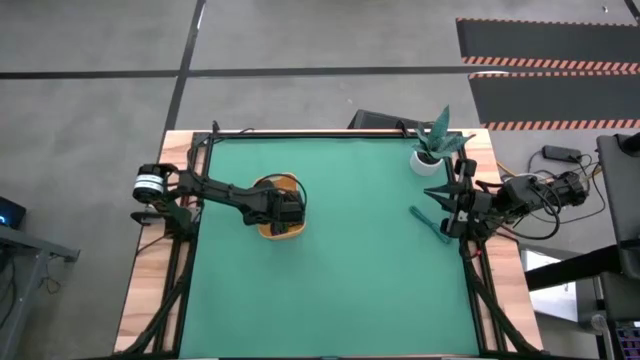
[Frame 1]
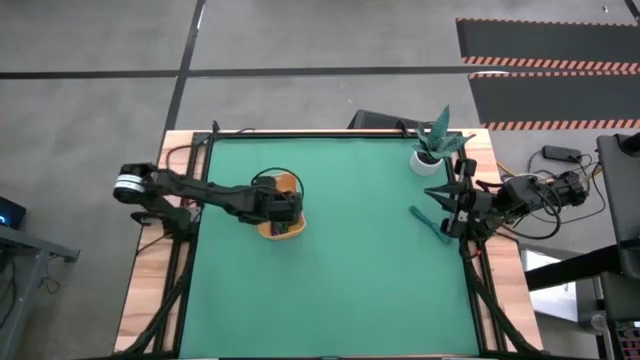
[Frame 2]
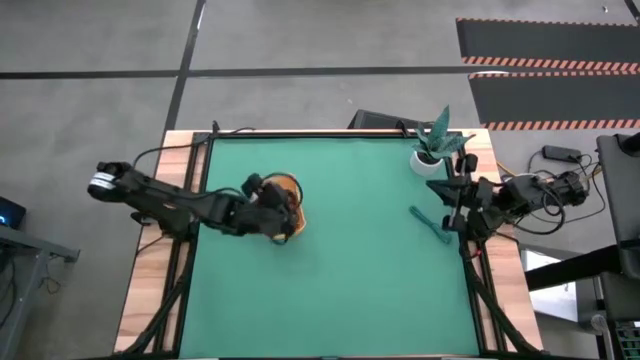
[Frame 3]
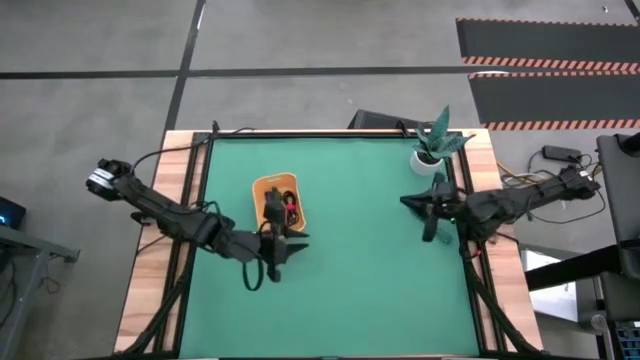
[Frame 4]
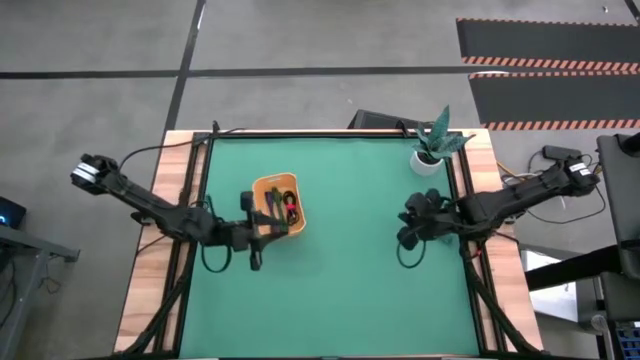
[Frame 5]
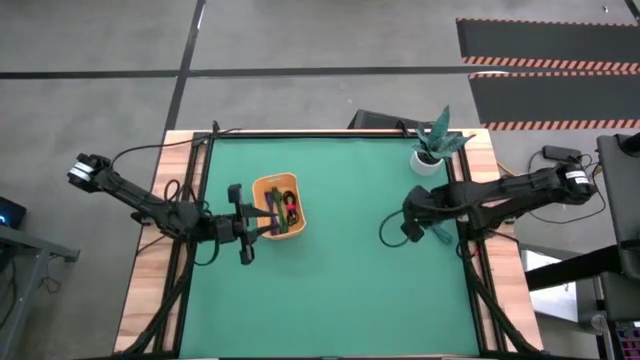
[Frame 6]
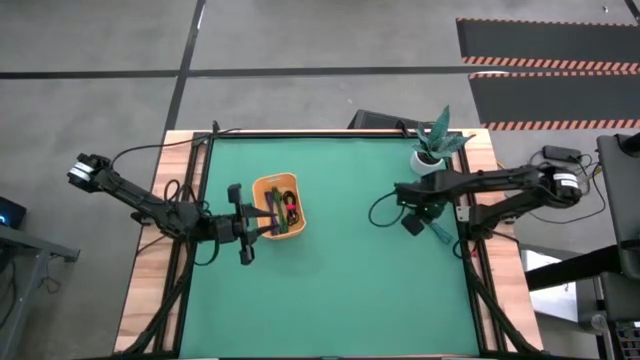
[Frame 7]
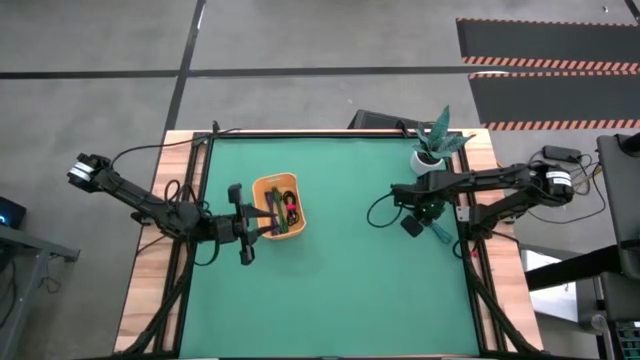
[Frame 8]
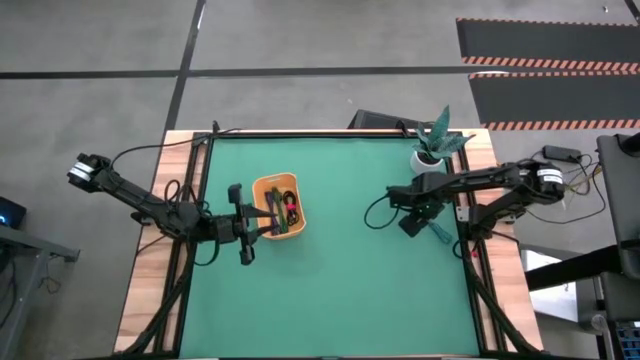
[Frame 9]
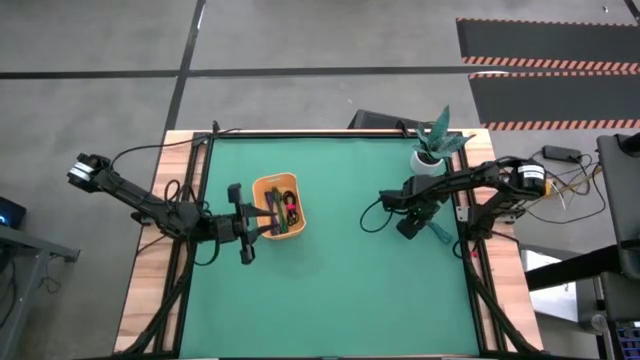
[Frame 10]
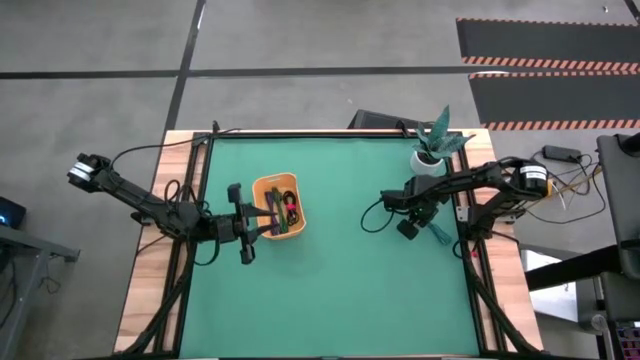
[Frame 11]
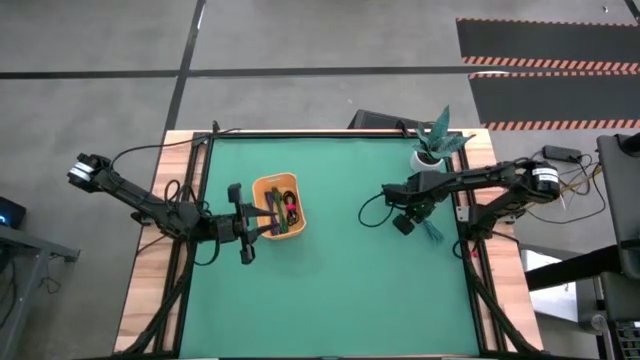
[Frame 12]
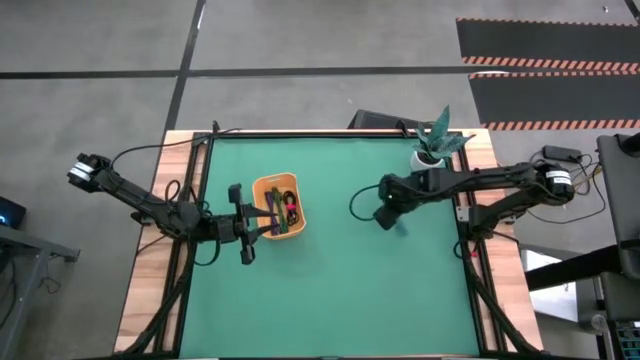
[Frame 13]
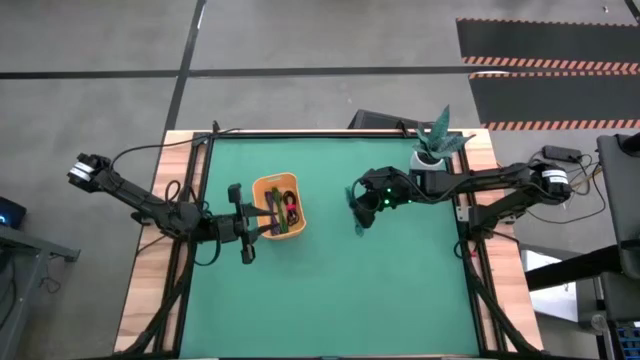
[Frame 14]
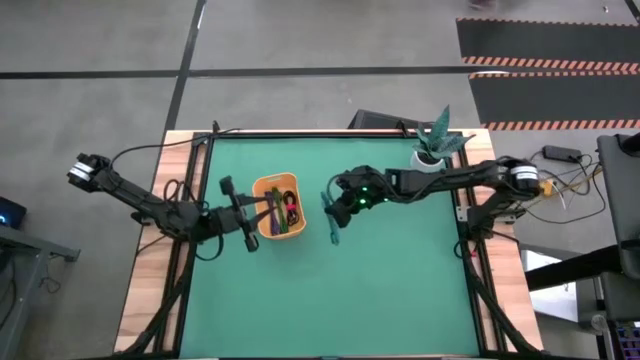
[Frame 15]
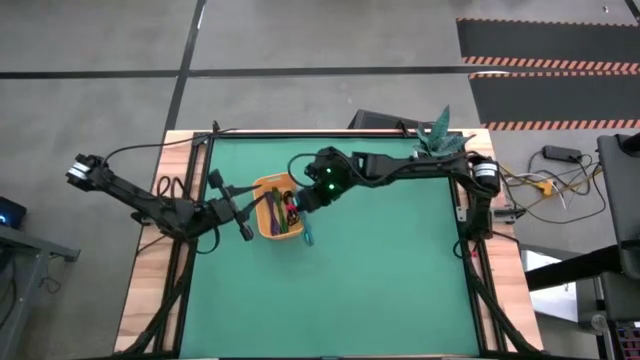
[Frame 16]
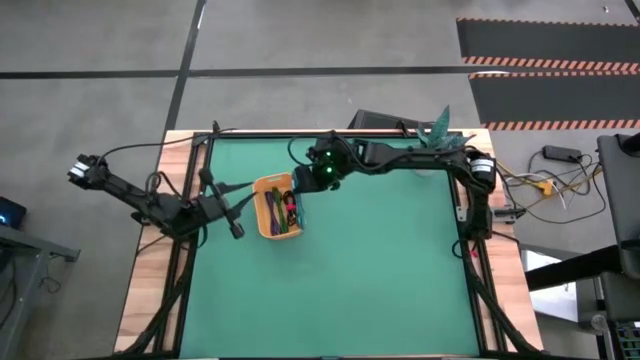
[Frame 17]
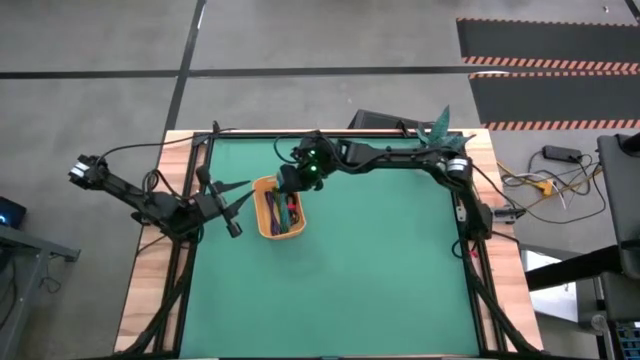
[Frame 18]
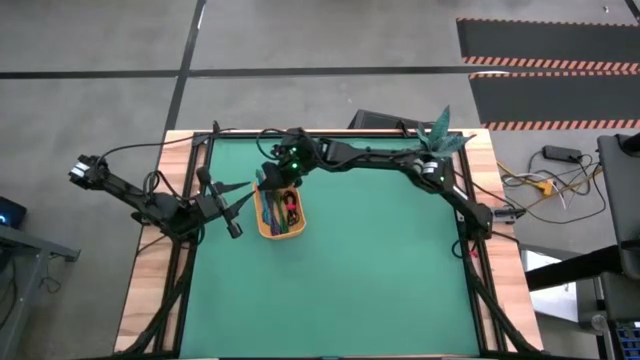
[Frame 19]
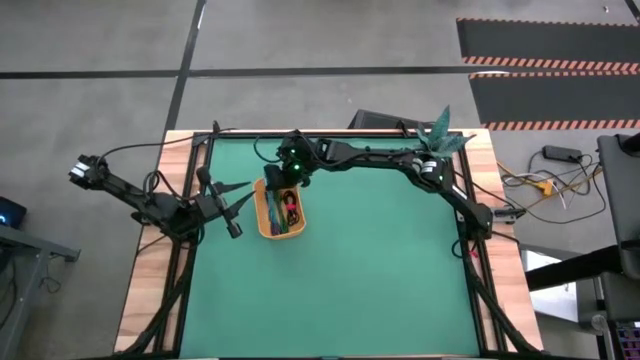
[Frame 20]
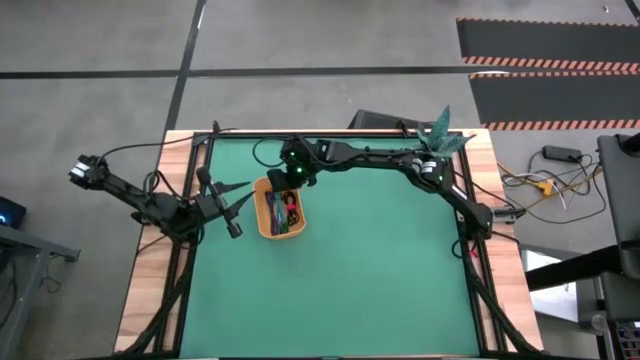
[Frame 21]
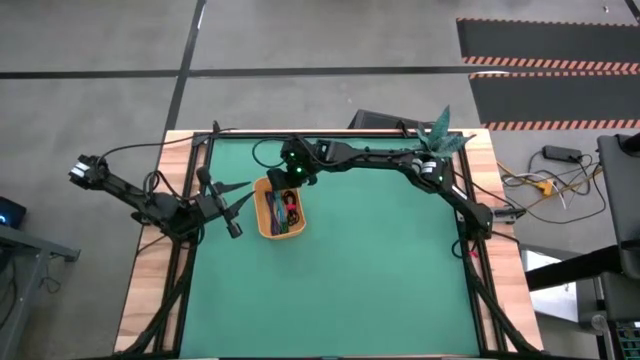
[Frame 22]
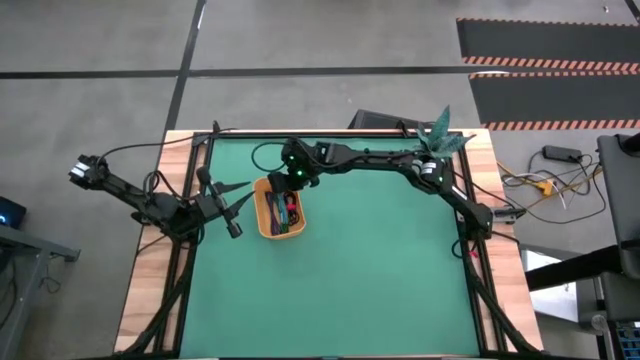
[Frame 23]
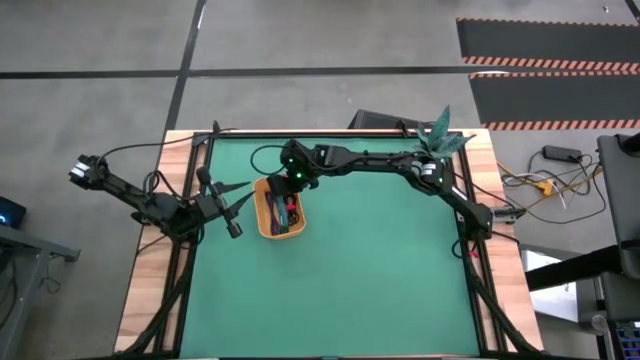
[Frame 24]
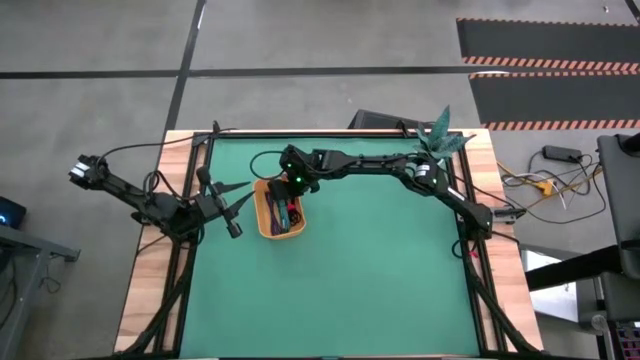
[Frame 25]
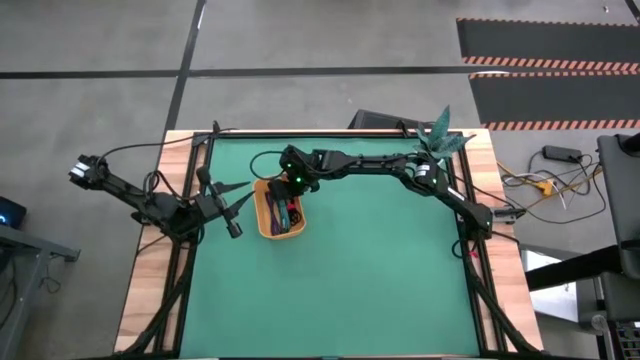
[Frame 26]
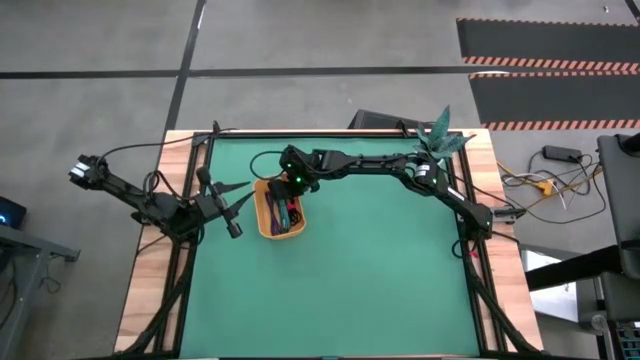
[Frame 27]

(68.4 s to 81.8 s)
Task: Pick and place USB-C Cables
Put the blue USB cable into the orange bin

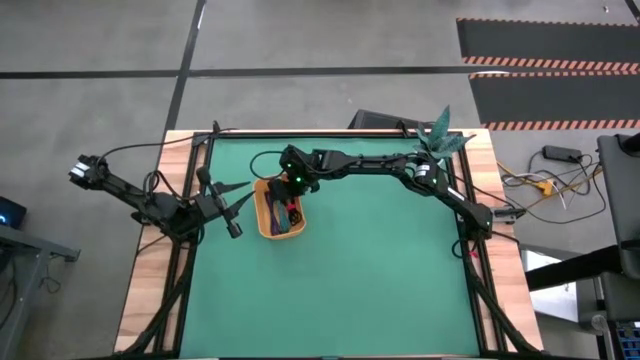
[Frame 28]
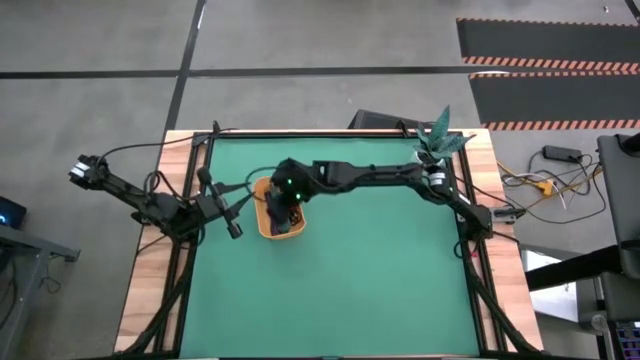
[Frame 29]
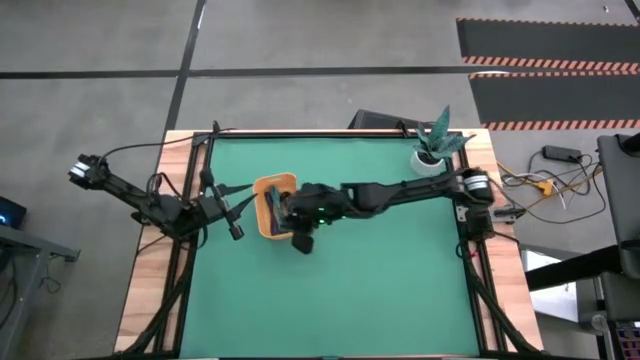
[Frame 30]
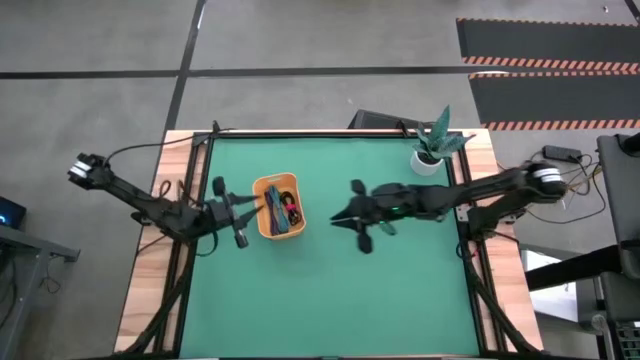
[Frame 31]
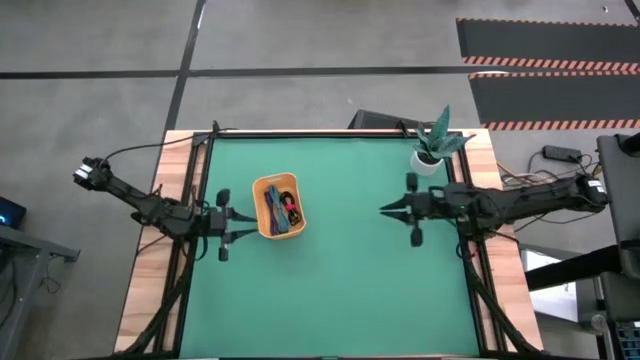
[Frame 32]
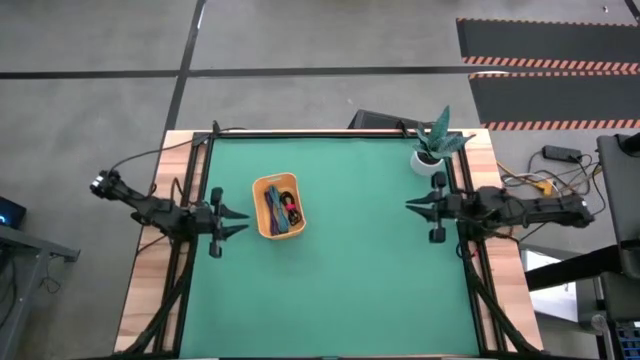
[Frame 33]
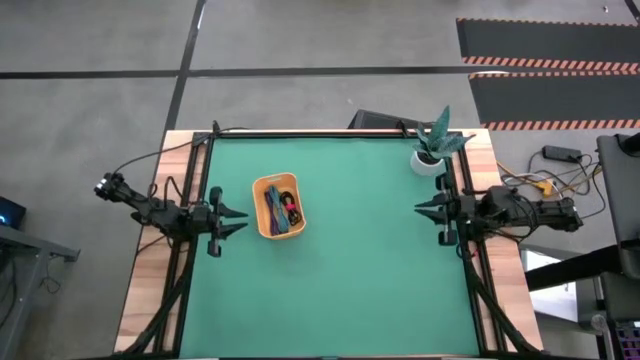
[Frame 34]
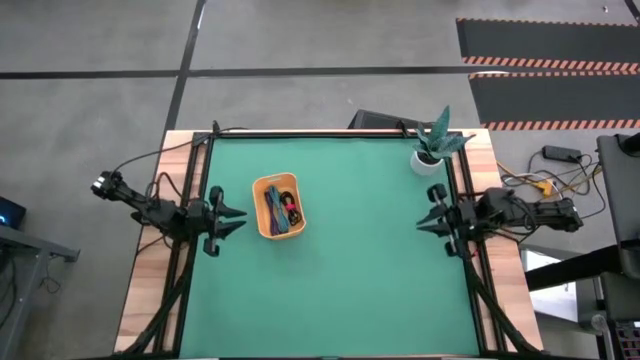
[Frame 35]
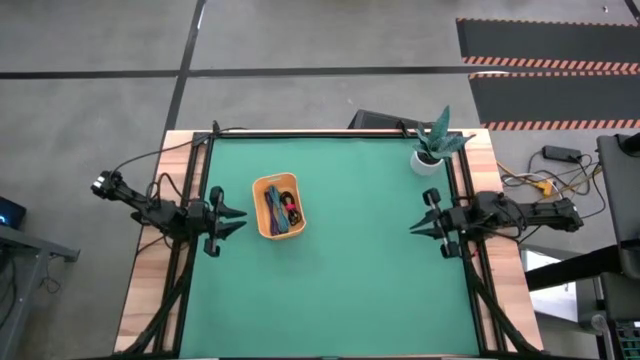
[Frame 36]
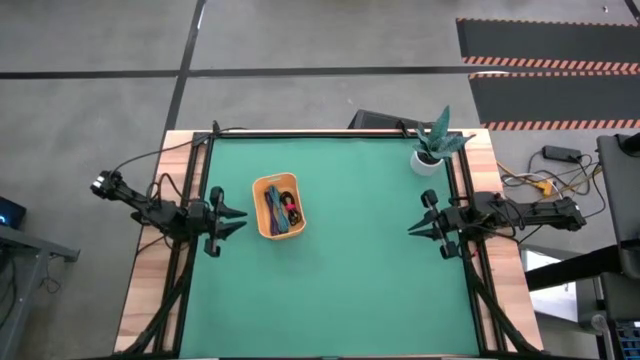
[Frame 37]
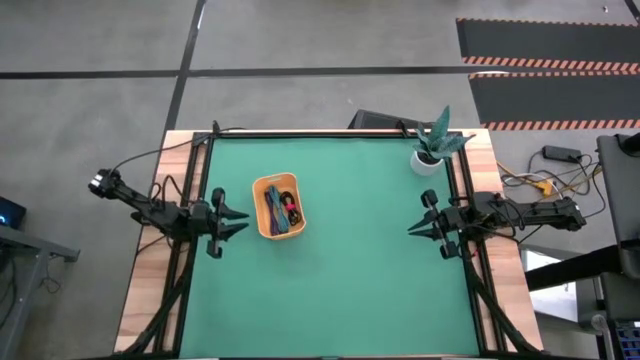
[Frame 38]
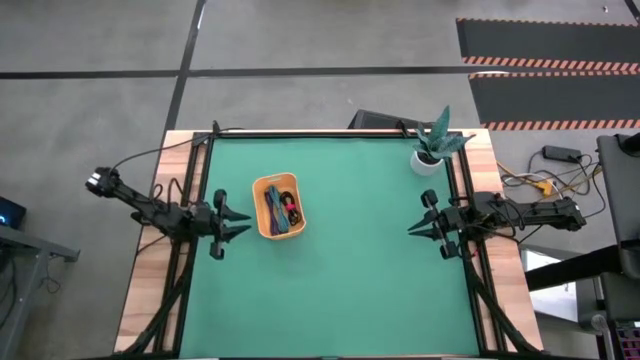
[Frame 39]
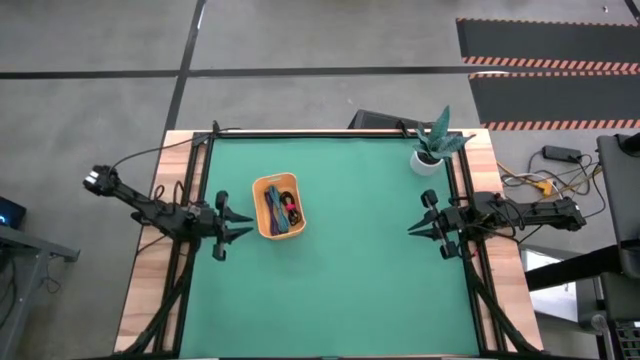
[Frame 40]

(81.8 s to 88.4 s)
Return to Home Position
